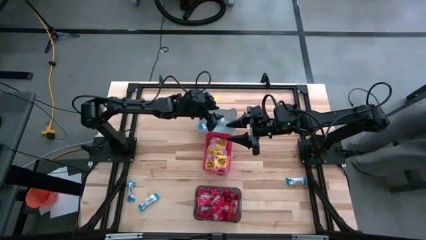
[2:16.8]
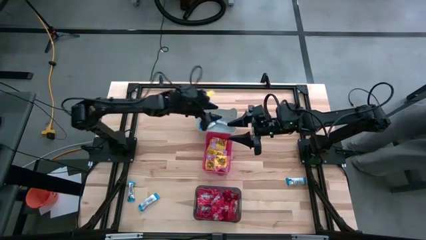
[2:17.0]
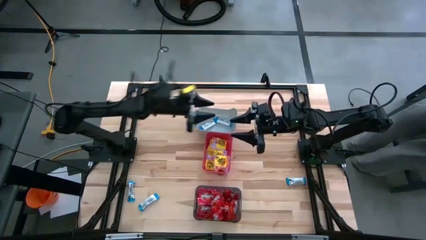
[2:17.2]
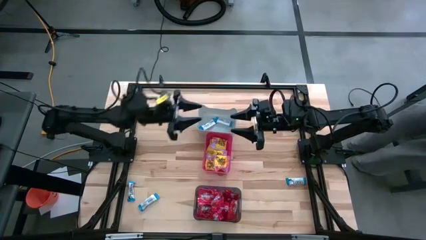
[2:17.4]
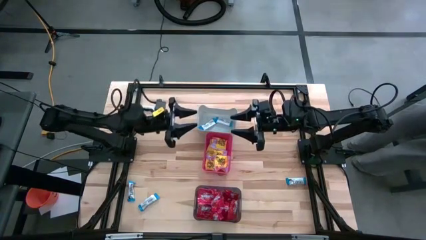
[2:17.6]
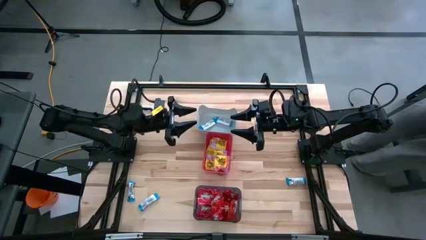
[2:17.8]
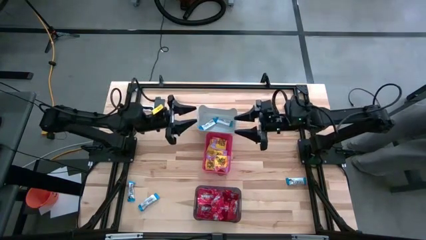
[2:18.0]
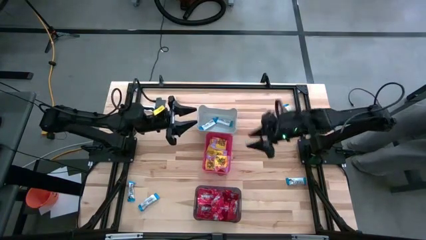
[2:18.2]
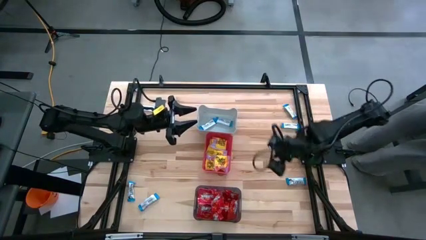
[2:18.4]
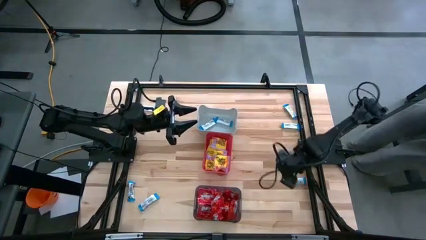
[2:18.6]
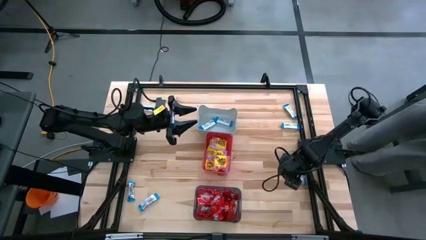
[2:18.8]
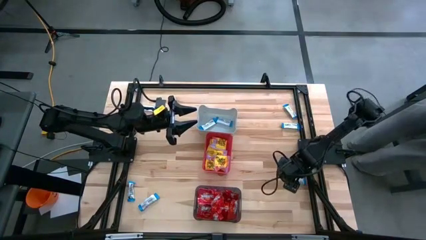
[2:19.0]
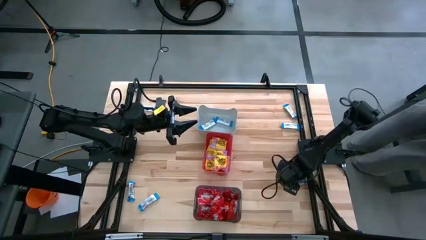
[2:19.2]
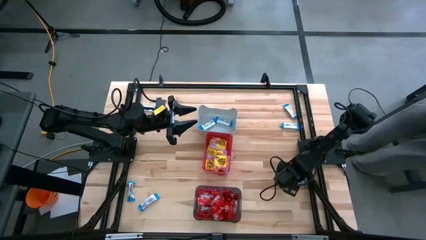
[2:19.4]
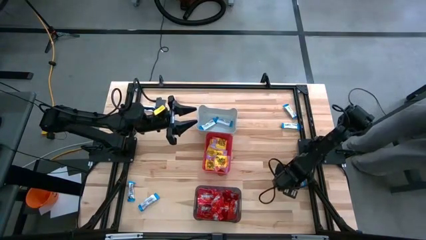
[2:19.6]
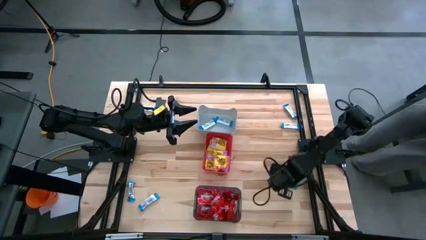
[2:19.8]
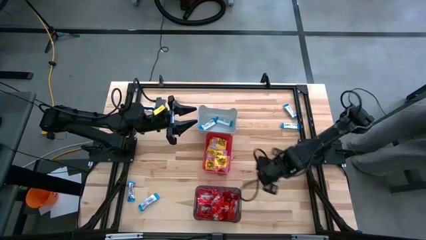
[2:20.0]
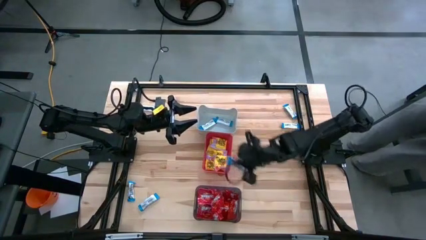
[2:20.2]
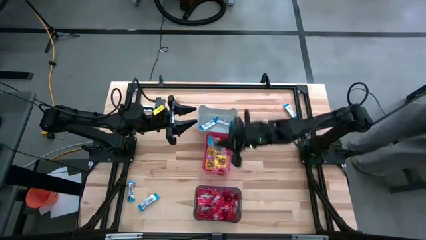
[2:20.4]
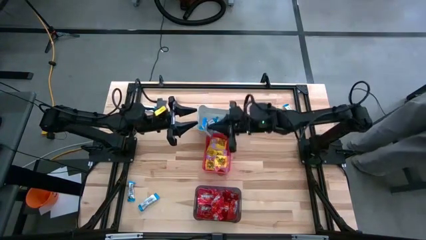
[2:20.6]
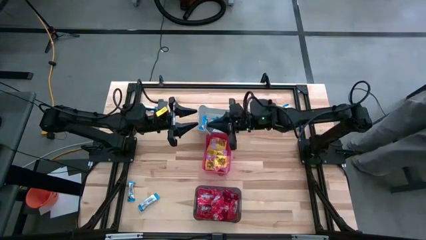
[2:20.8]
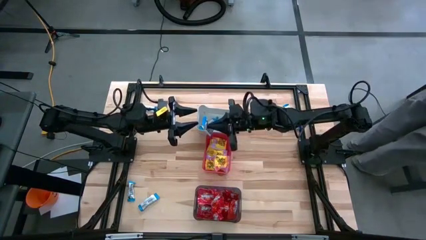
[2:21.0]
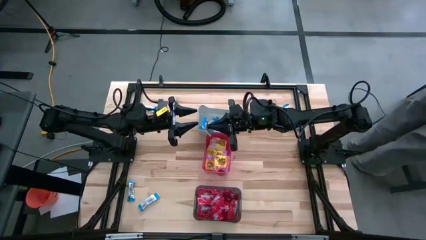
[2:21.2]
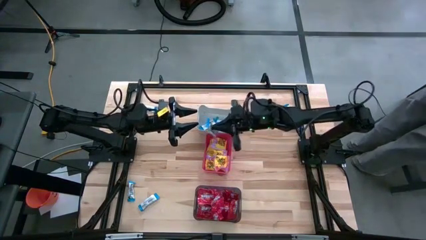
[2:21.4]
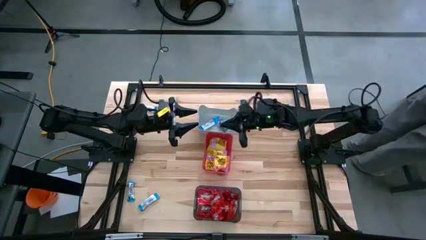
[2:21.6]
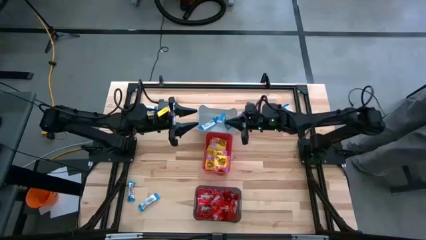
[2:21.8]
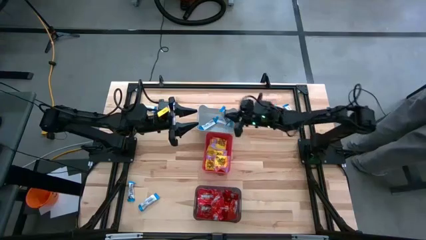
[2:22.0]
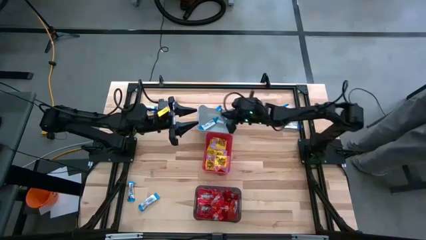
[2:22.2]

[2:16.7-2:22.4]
Task: Sort candy
Put the white candy into the white bin

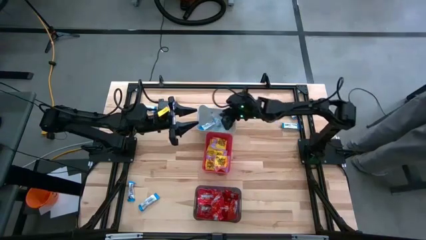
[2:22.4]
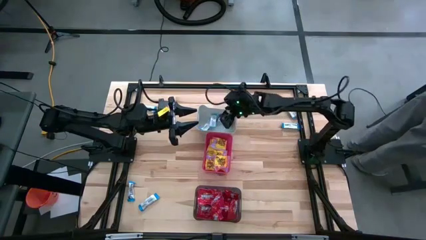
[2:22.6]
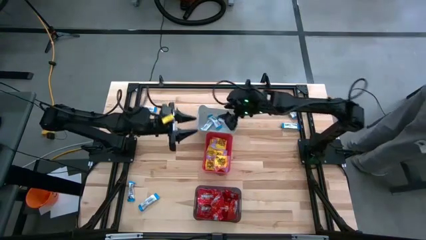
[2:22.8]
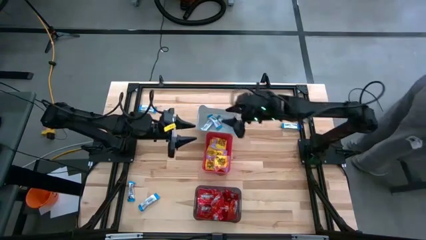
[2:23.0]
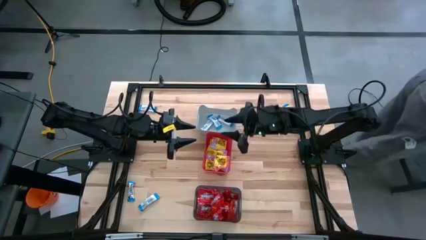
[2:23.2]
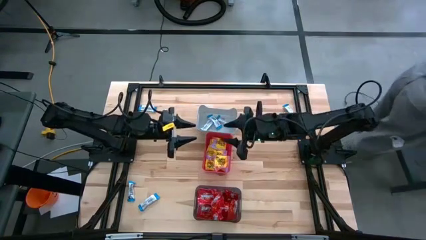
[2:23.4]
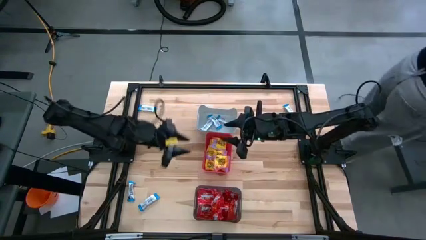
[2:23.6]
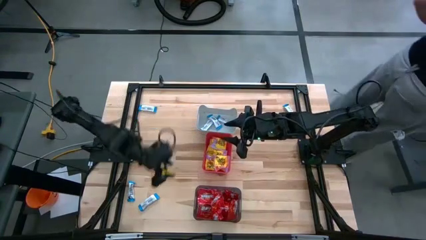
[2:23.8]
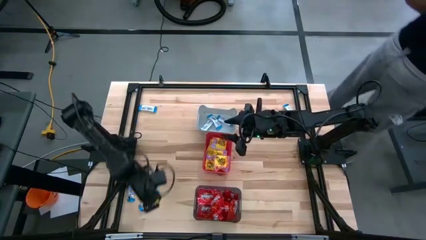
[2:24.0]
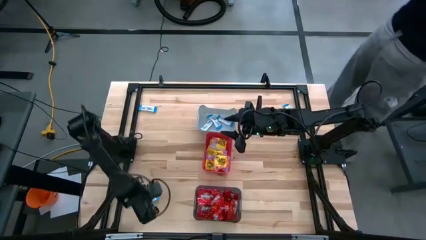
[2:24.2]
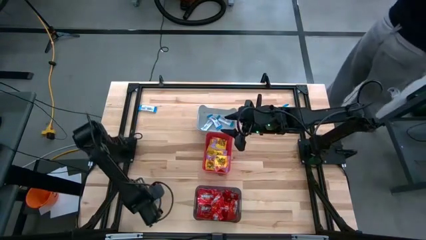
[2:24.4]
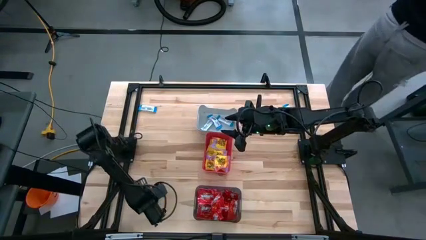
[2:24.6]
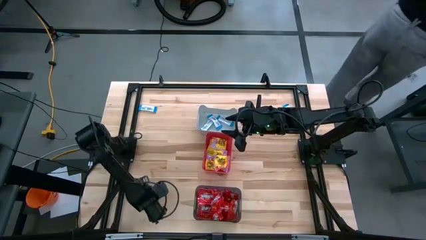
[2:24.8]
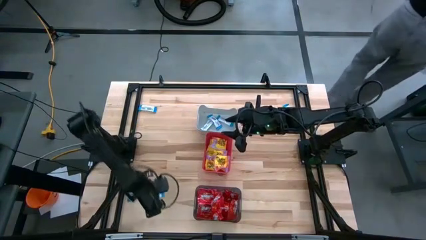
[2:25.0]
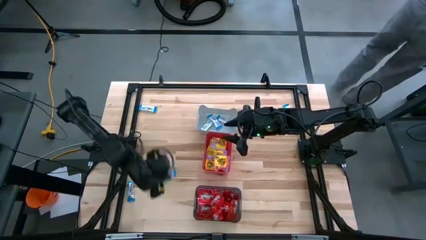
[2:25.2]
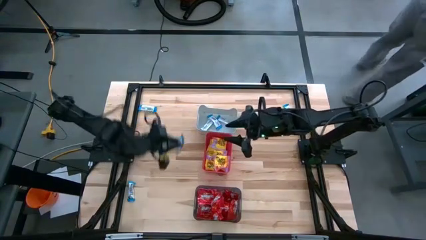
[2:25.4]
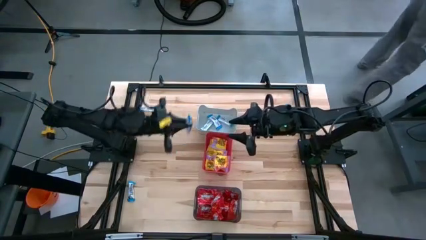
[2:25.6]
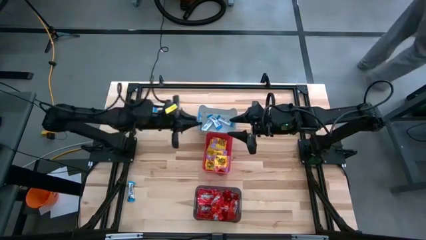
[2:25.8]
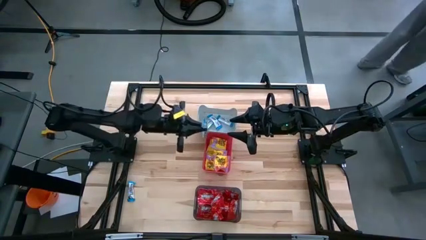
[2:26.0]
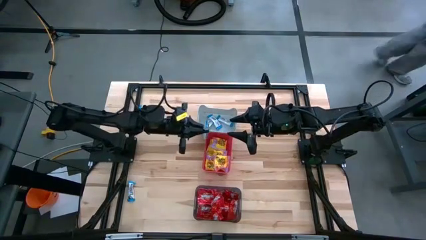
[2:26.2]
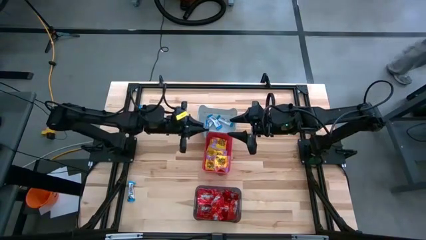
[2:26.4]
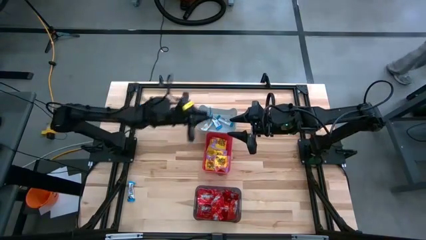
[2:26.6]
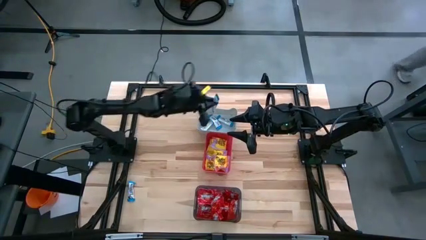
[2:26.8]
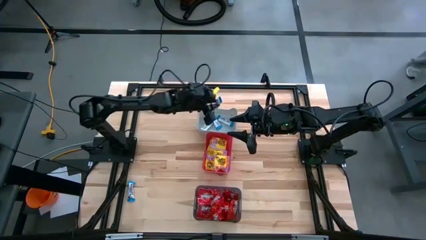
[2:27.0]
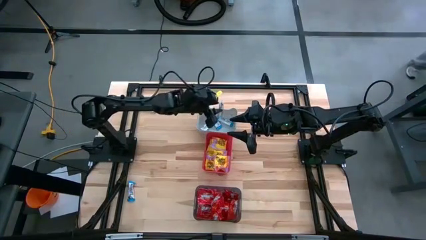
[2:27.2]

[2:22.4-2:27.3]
Put the white candy into the white bin

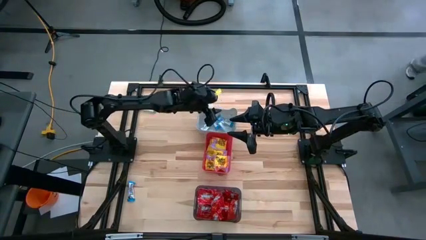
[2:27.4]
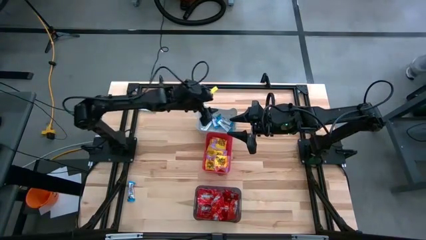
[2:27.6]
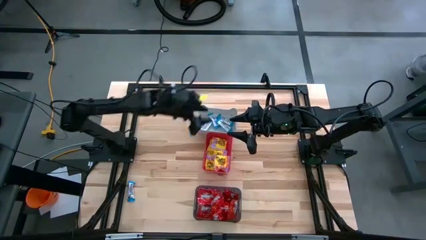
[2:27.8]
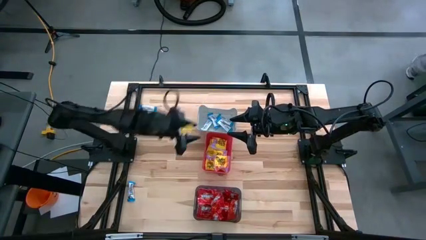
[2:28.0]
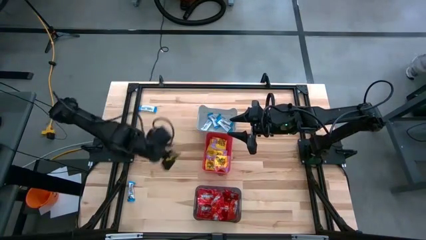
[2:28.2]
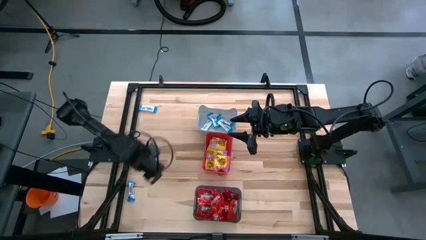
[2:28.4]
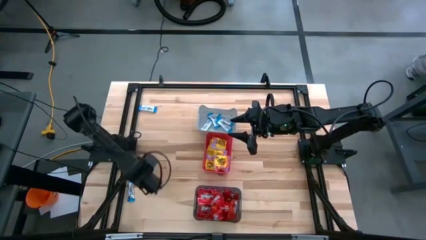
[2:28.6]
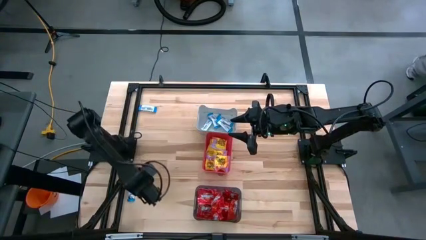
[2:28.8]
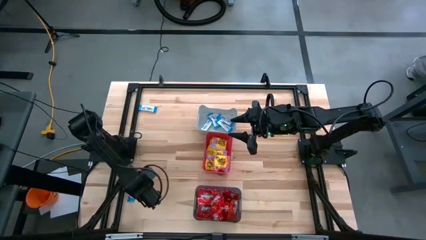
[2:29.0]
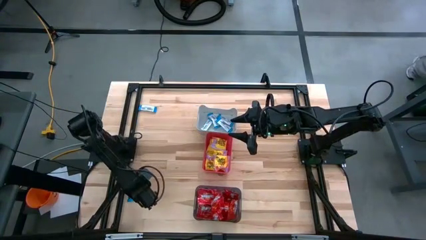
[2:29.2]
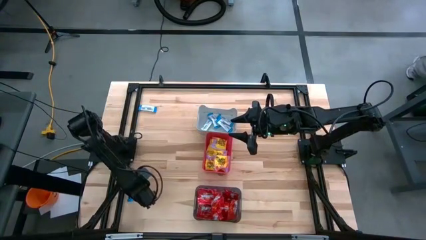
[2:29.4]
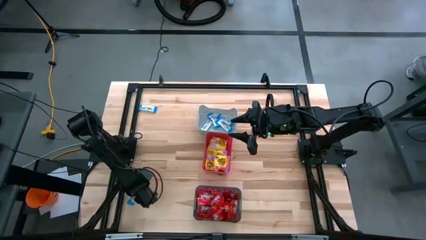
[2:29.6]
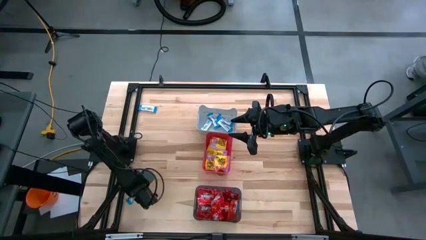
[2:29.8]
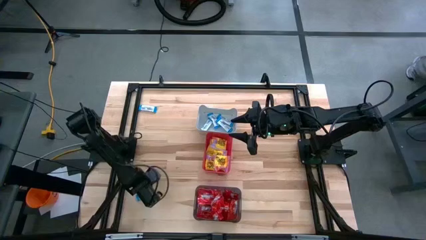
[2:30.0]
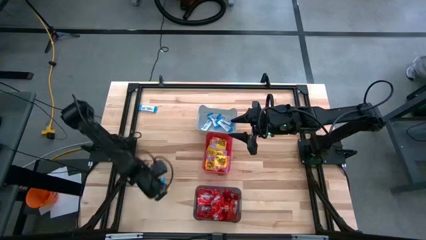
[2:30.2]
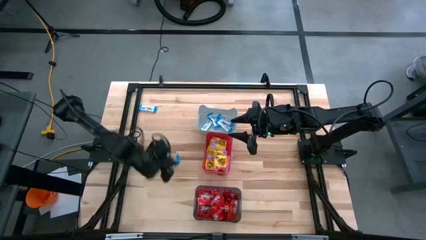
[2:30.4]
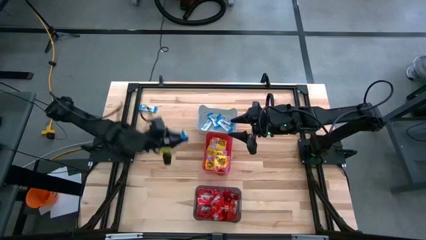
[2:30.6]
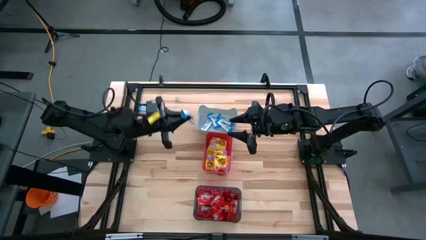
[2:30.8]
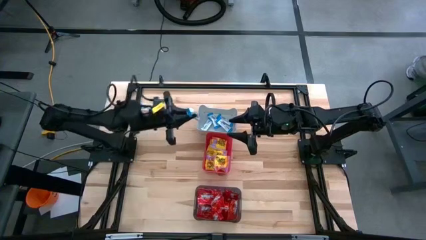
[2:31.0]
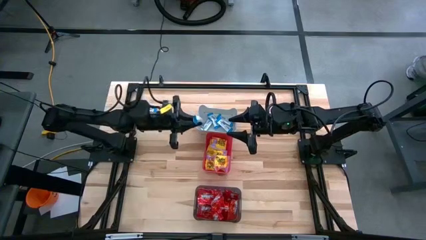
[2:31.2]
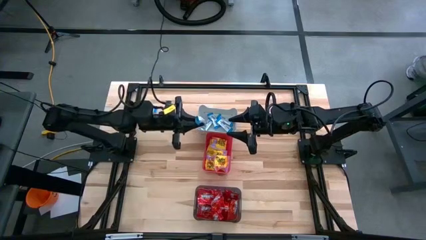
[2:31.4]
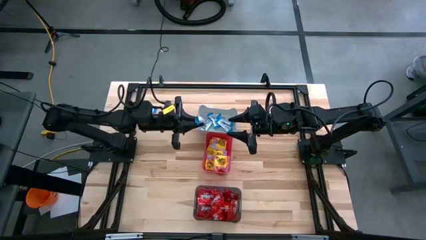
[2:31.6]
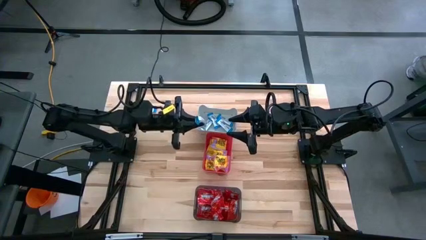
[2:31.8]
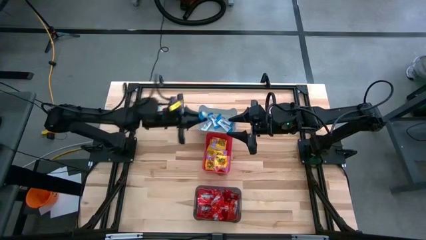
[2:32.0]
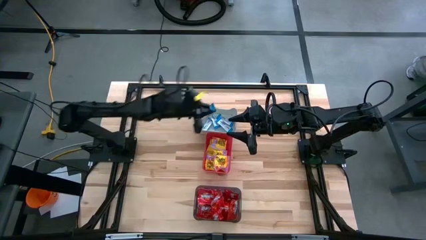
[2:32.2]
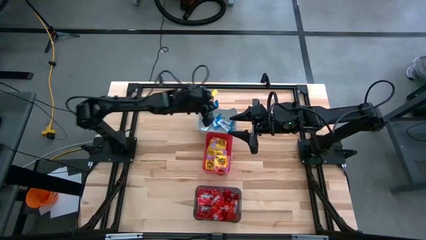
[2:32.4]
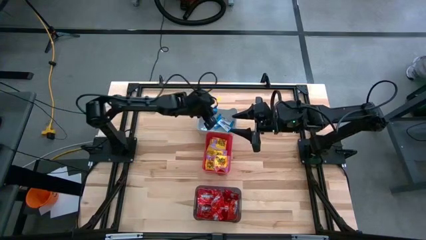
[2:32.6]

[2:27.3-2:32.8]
Put the white candy into the white bin
